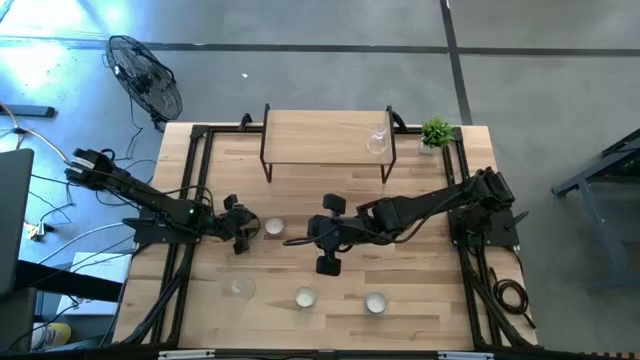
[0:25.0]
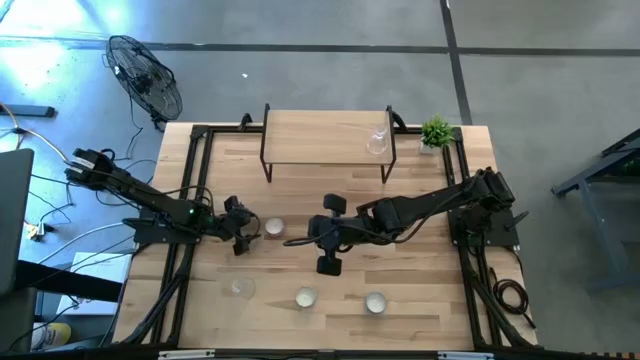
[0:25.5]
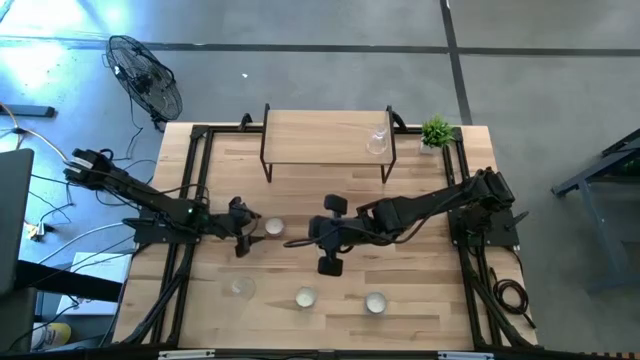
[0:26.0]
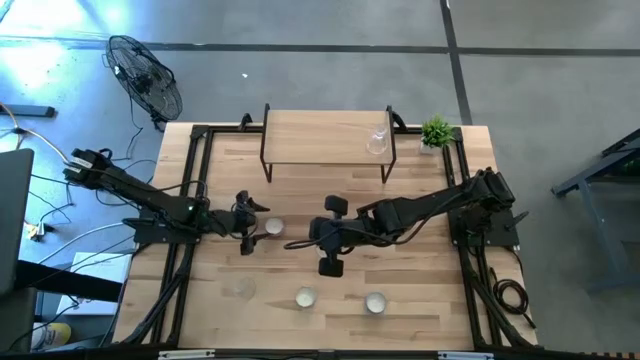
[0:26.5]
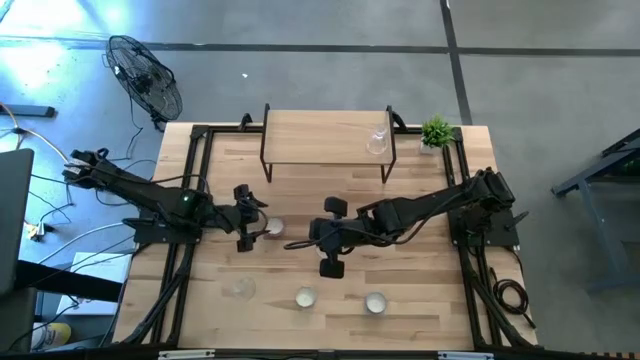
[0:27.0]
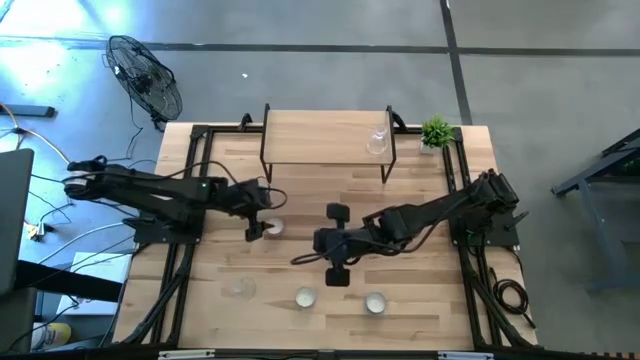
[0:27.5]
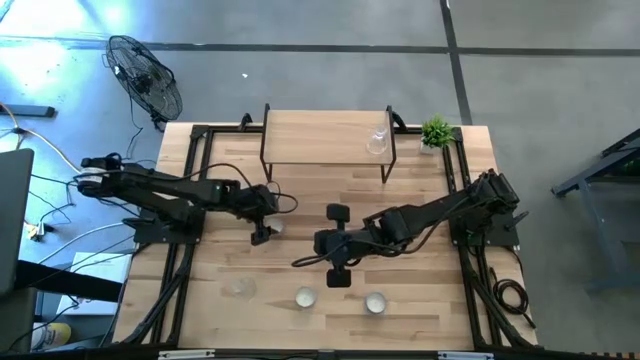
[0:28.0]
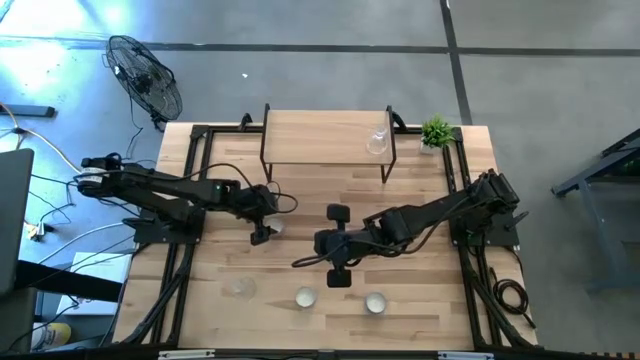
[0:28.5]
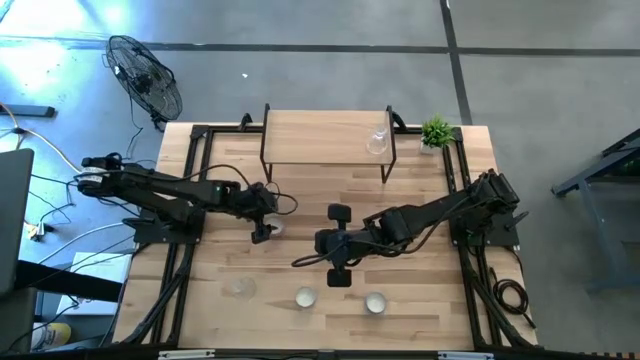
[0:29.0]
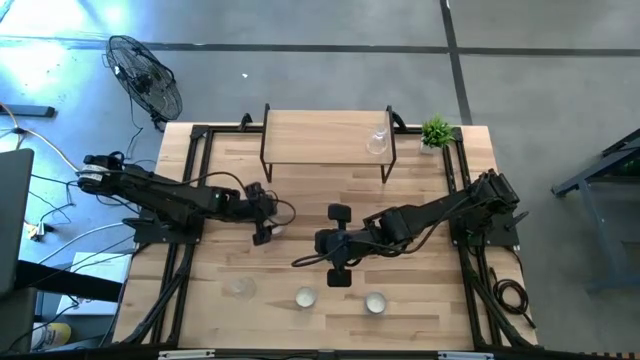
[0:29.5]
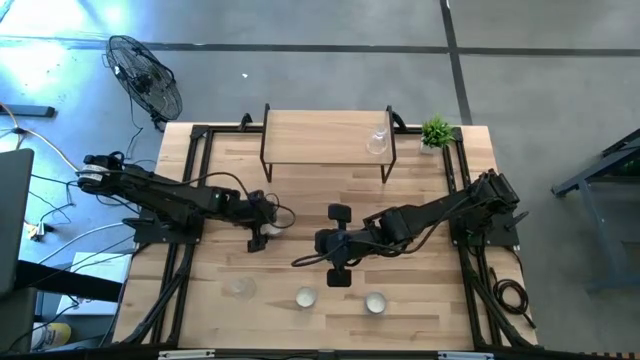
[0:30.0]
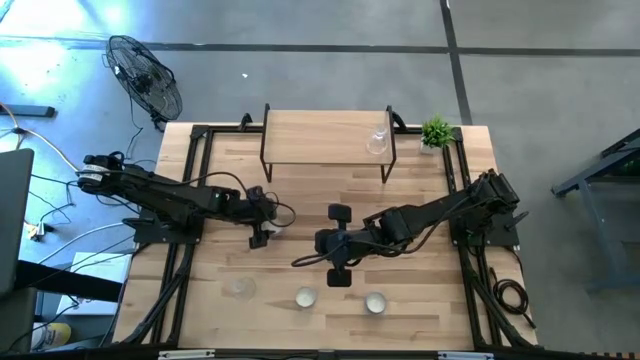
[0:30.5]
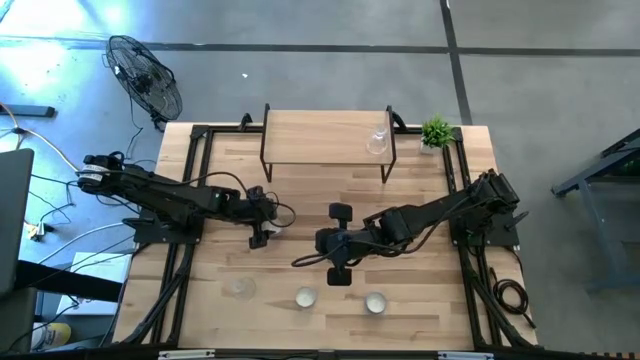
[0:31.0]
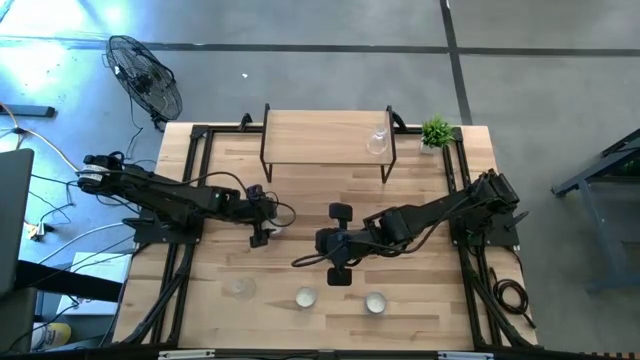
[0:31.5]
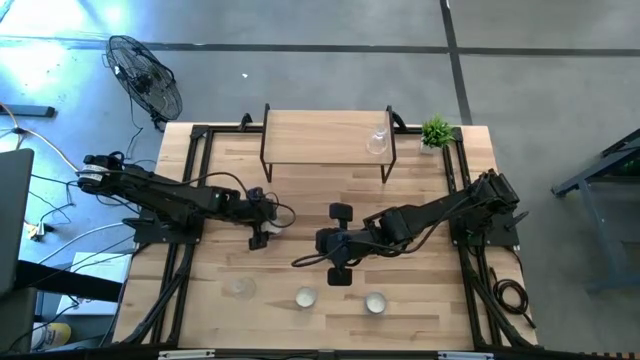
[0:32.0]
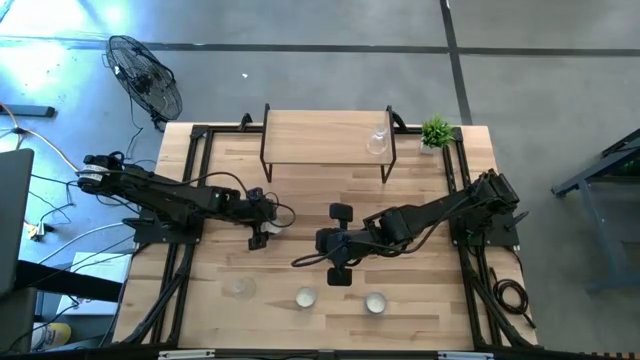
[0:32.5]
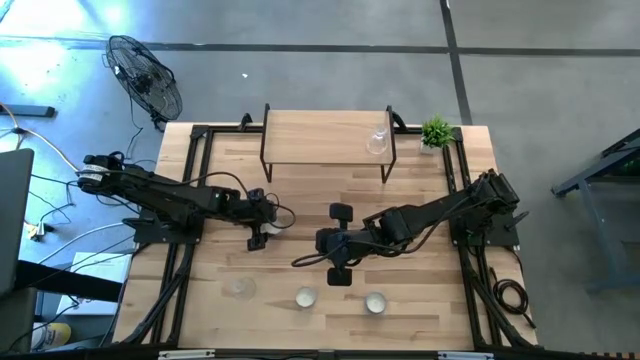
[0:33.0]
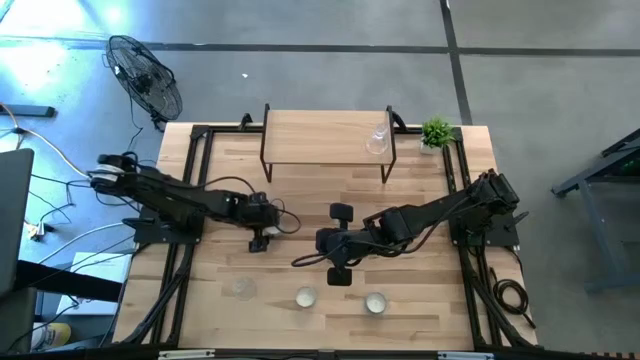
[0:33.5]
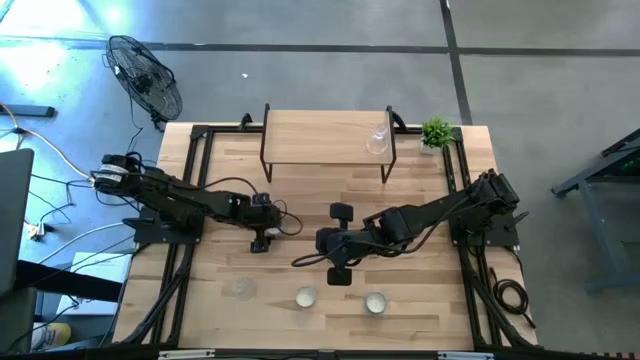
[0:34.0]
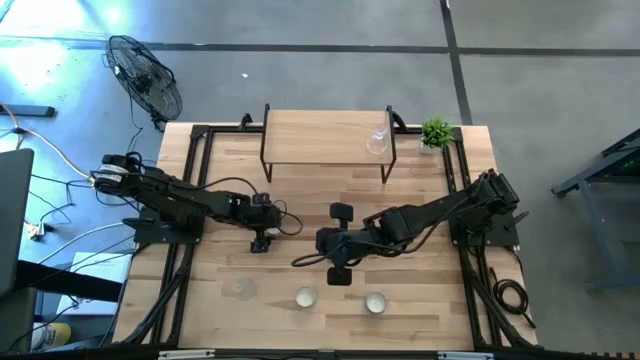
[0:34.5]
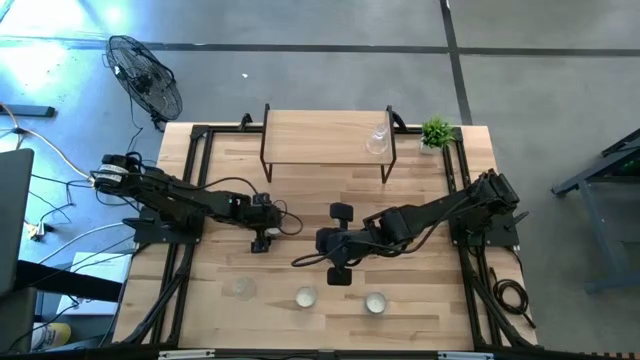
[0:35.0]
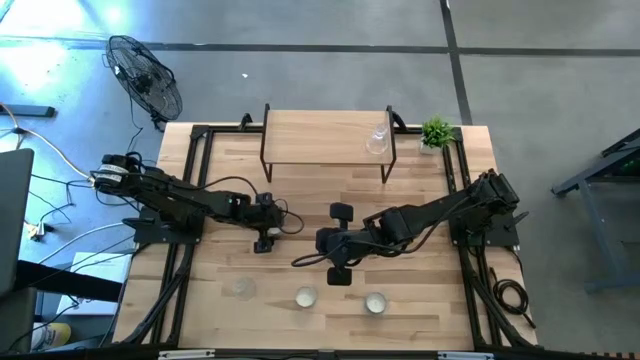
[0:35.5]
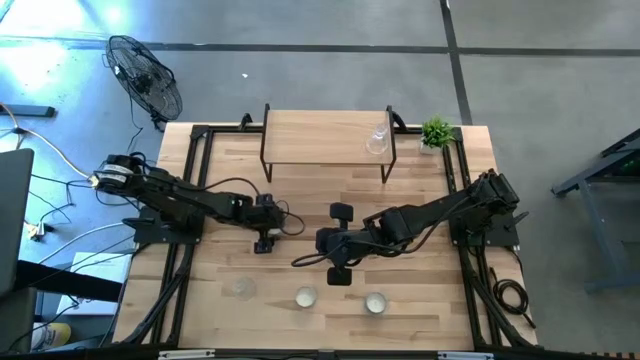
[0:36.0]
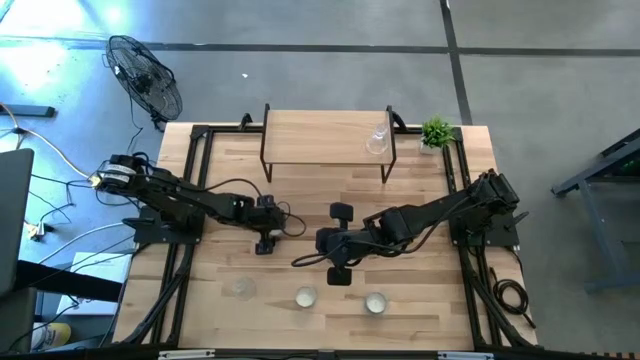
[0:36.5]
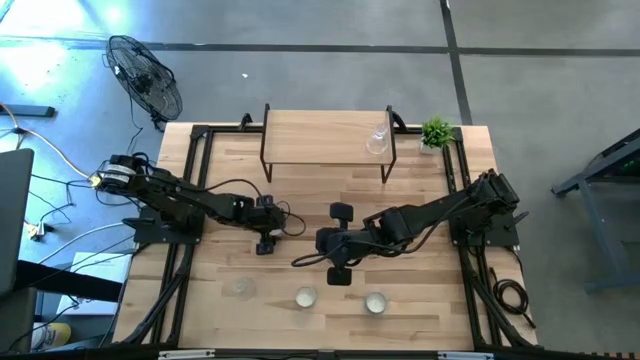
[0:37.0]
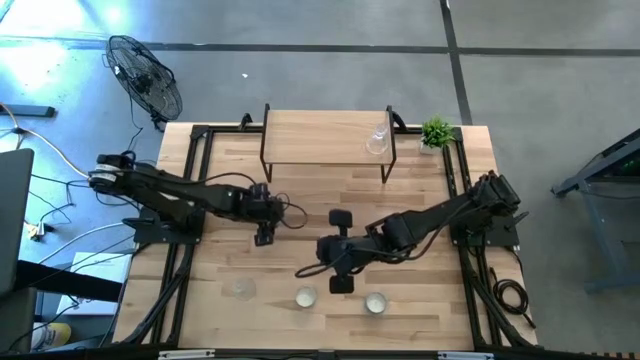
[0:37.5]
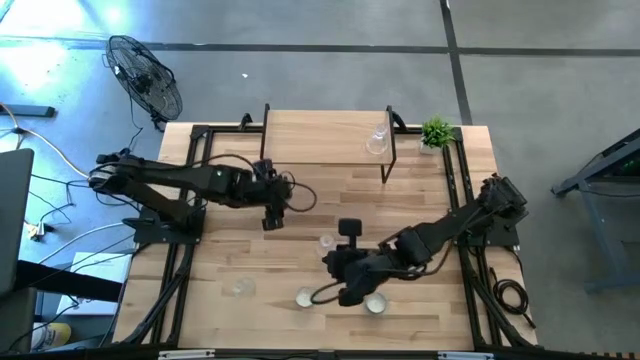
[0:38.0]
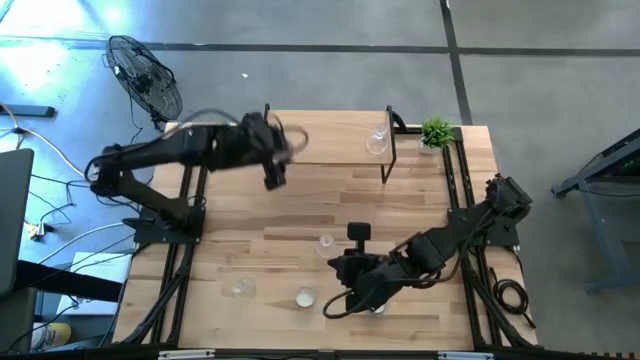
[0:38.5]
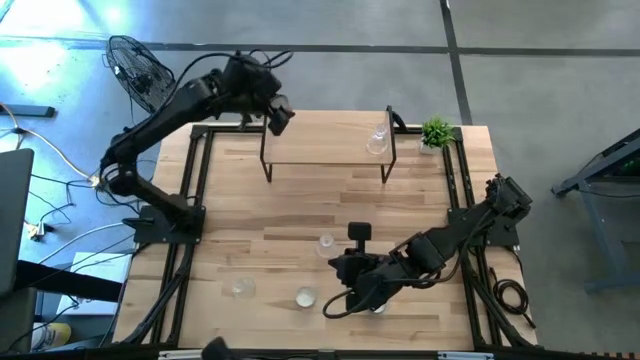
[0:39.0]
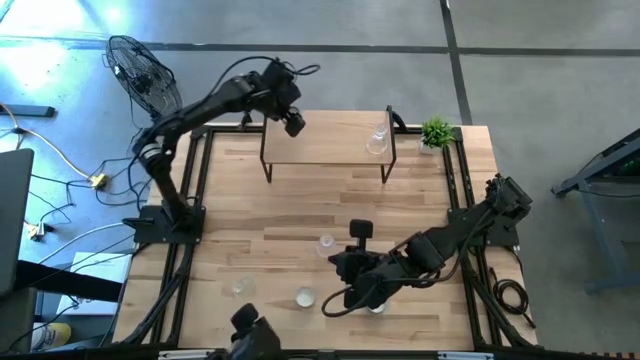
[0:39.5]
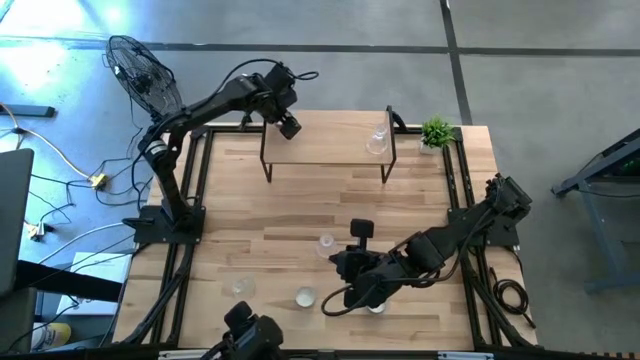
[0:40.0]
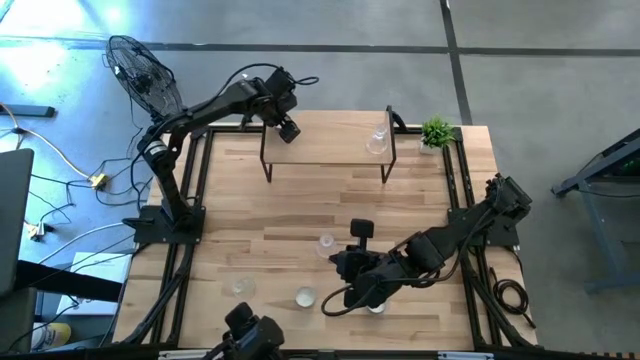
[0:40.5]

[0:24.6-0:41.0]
Task: Pick & Place candle stick holders
Put the purple patterned scented candle on the shelf

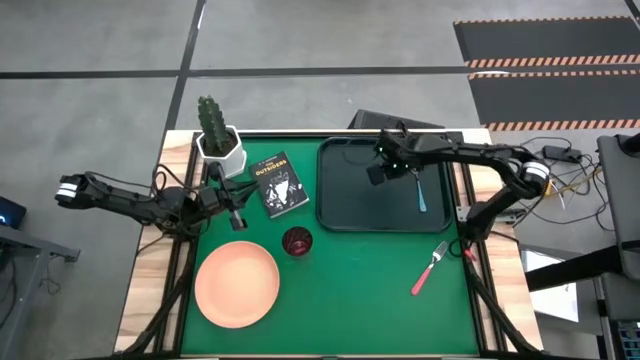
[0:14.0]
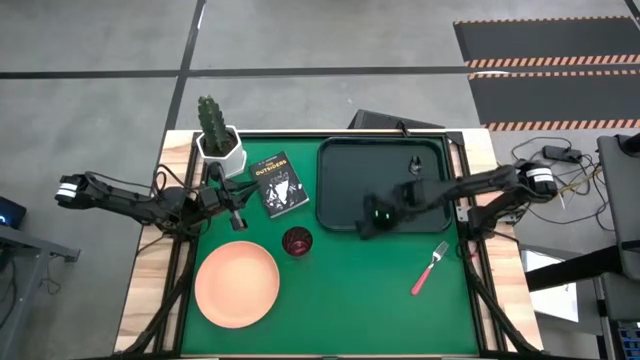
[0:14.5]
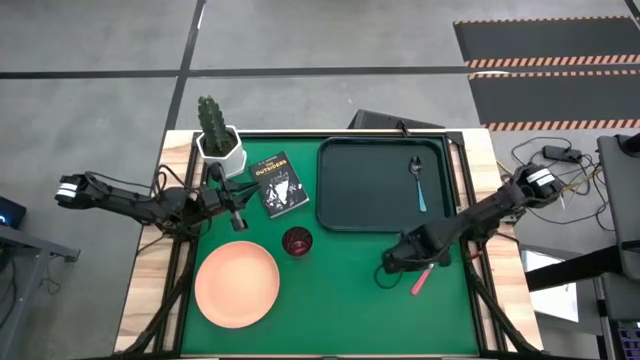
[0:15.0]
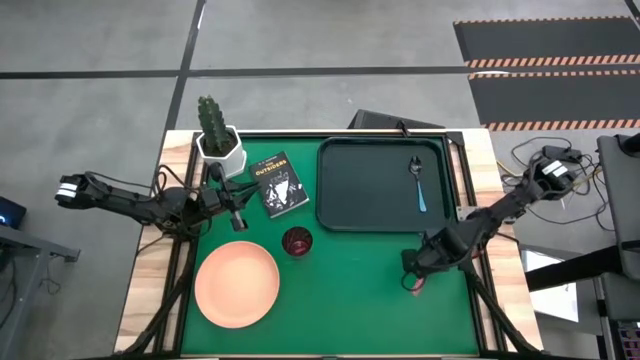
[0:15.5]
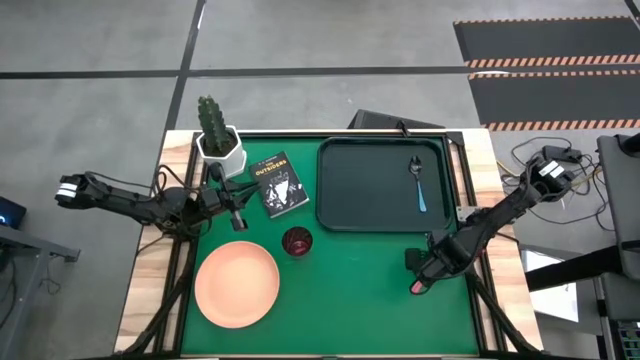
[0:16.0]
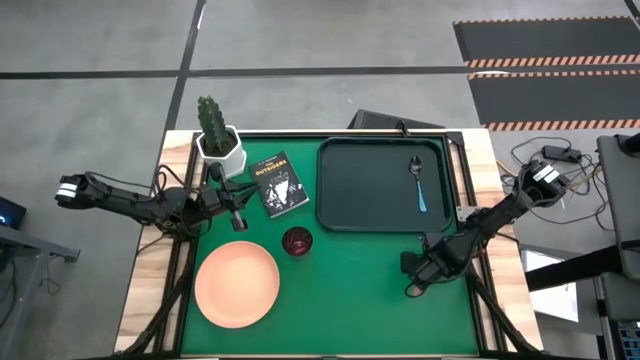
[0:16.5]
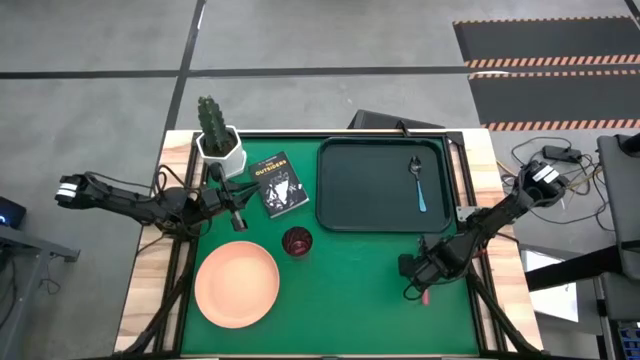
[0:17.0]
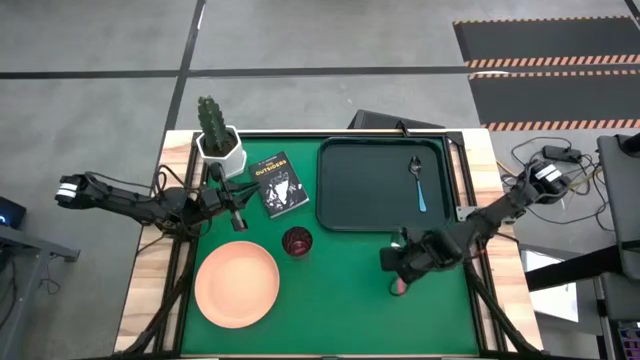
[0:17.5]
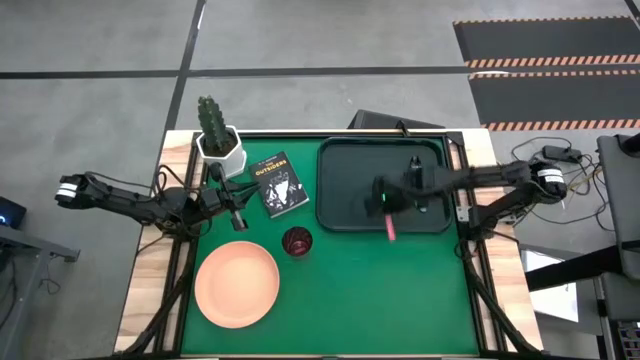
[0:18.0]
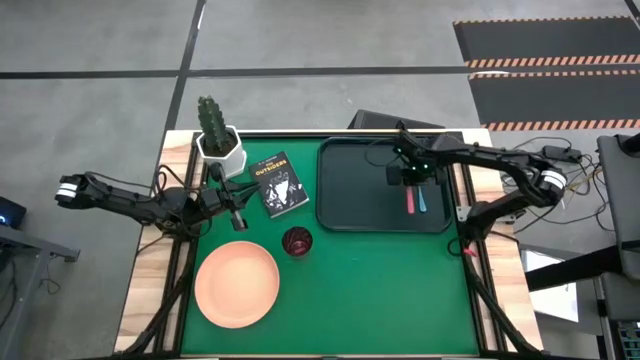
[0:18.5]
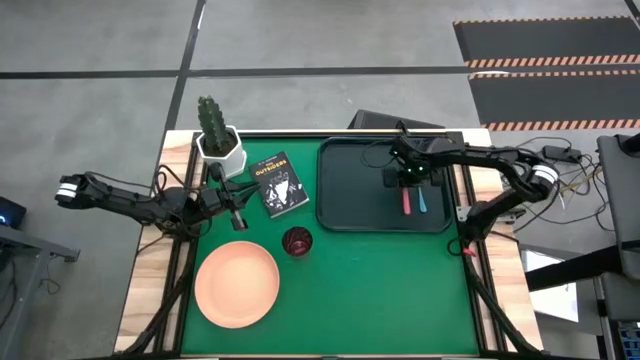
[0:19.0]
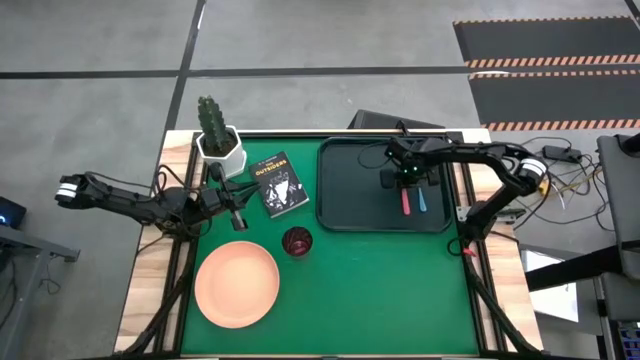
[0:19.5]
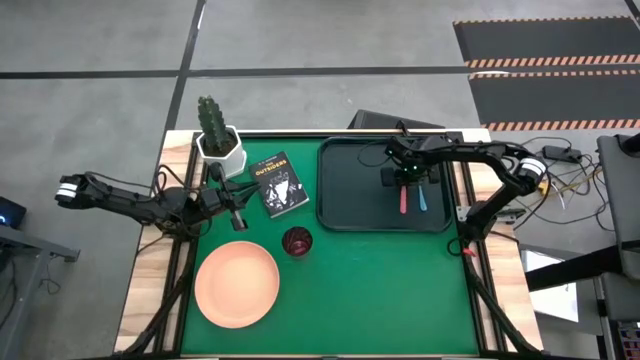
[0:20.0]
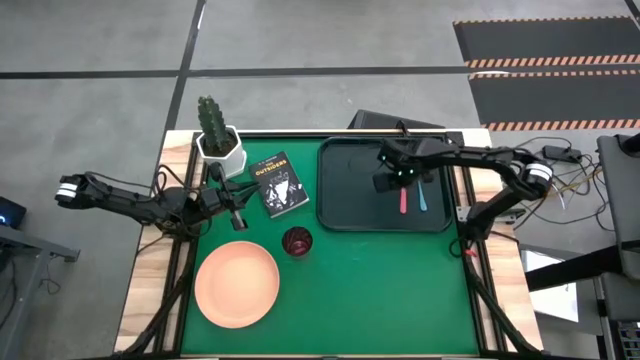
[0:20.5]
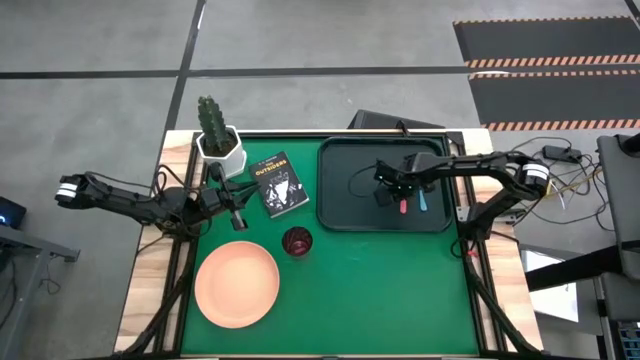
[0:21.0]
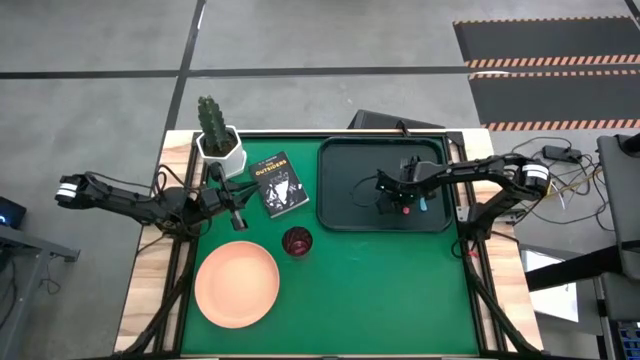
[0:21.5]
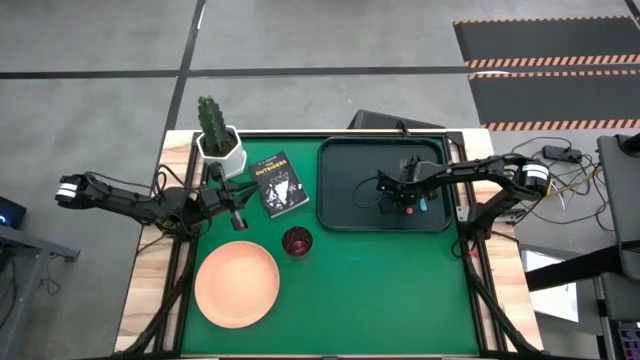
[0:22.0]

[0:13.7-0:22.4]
Task: Pick and place plate/cup/fork/spoon on tray
Put the pink fork on the black serving tray to the left of the blue spoon
